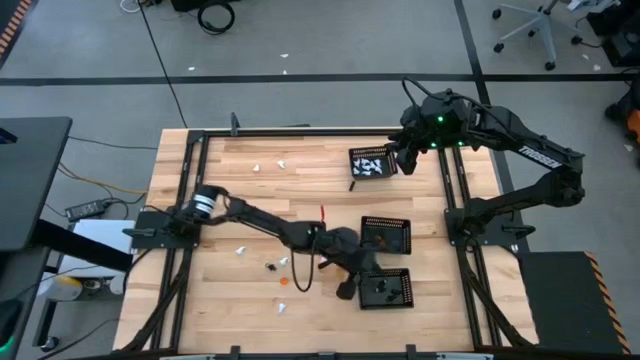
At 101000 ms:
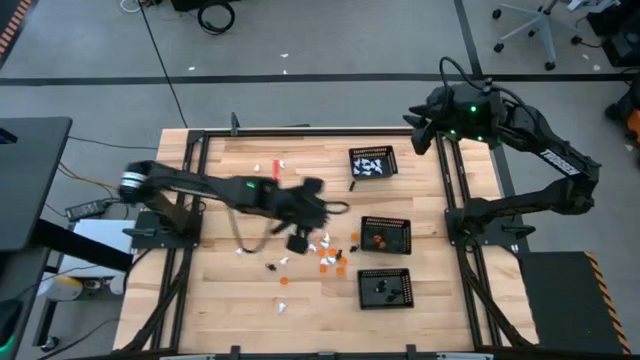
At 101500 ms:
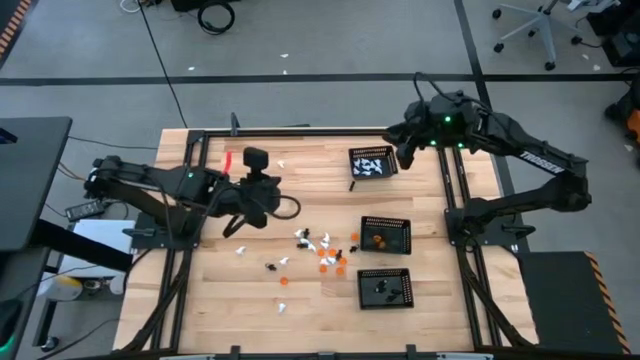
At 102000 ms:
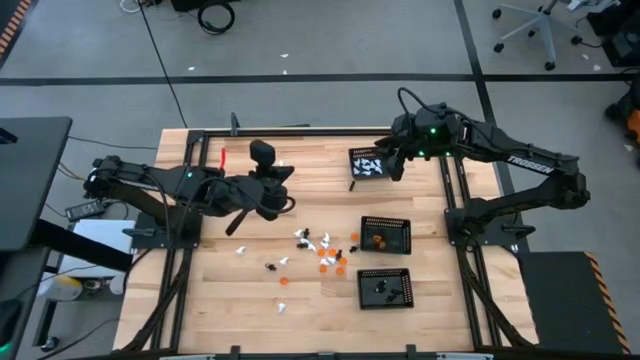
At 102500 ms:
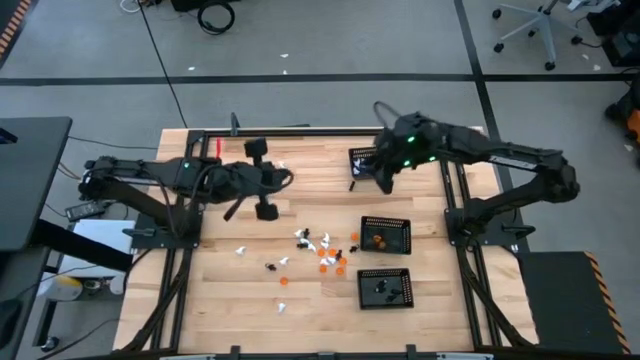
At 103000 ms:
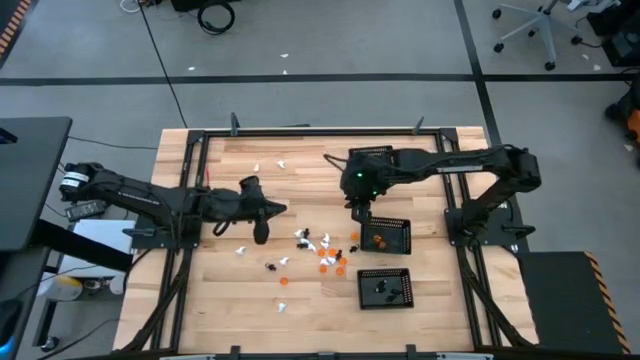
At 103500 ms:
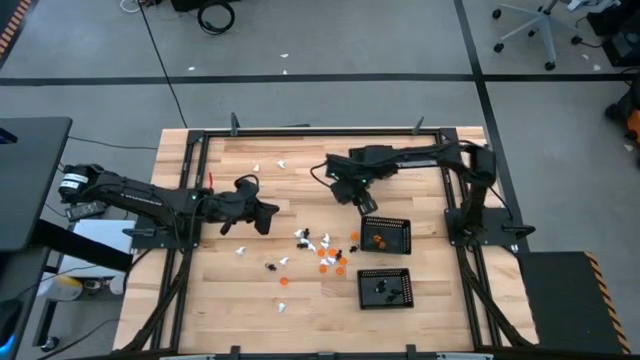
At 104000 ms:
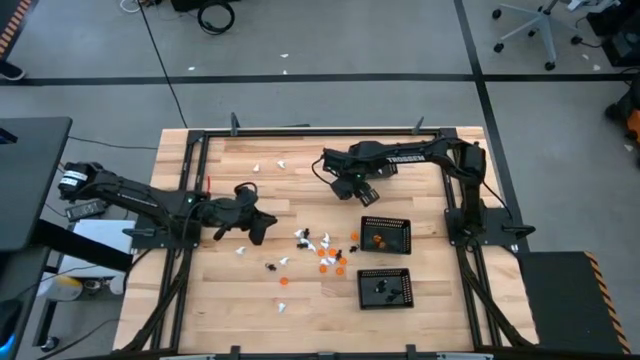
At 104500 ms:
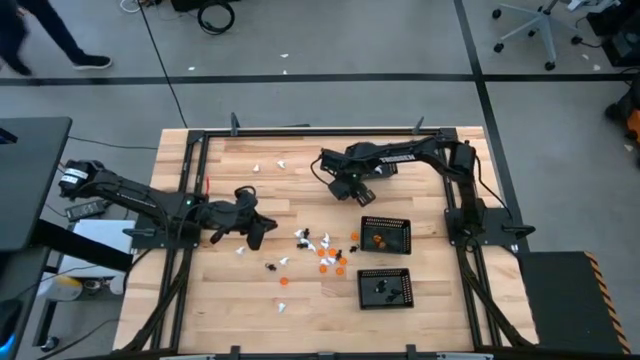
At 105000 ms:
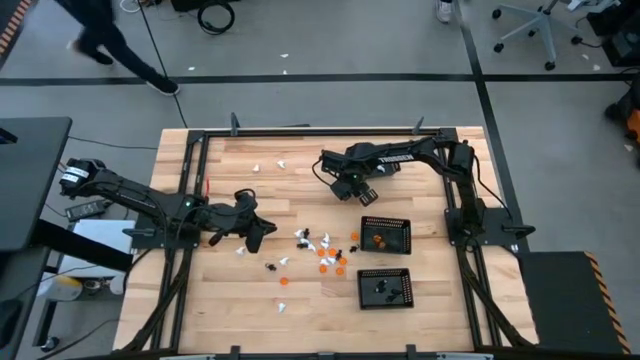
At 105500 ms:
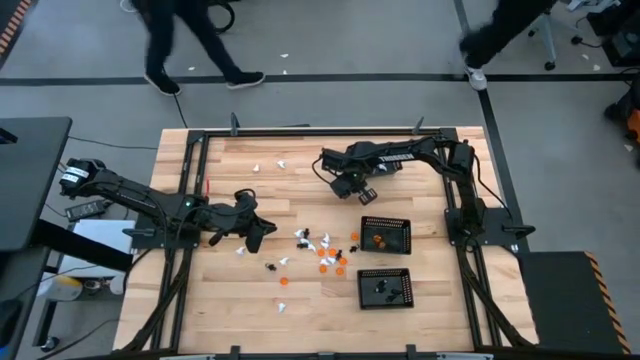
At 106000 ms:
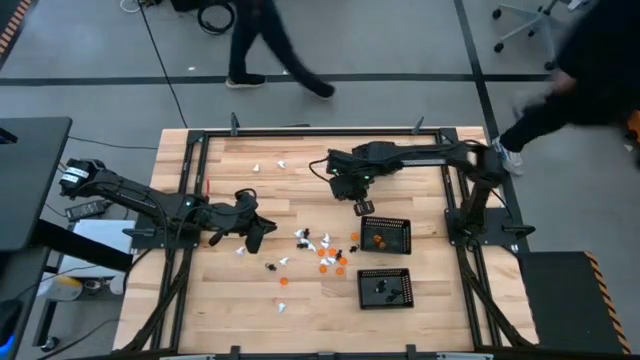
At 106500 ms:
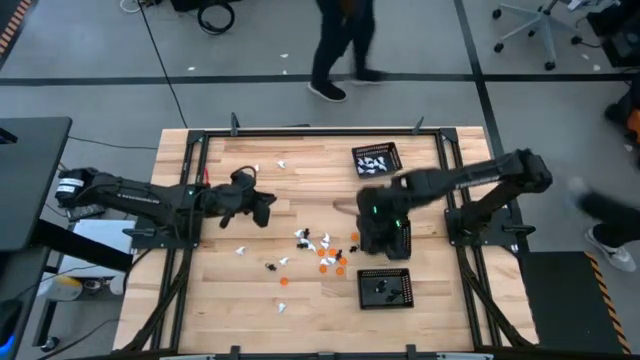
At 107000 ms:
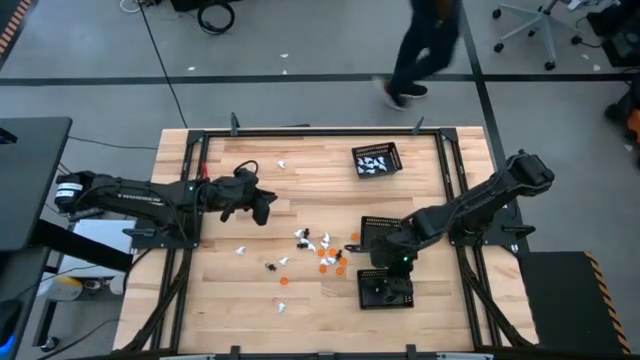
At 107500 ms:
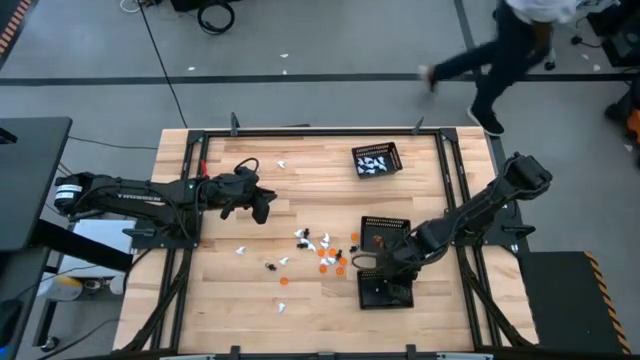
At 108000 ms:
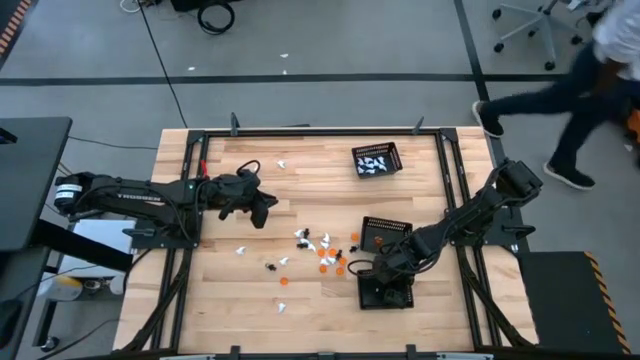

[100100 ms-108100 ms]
Task: Sort Halloween decoration
Put the black skeleton toy into the bottom black bin

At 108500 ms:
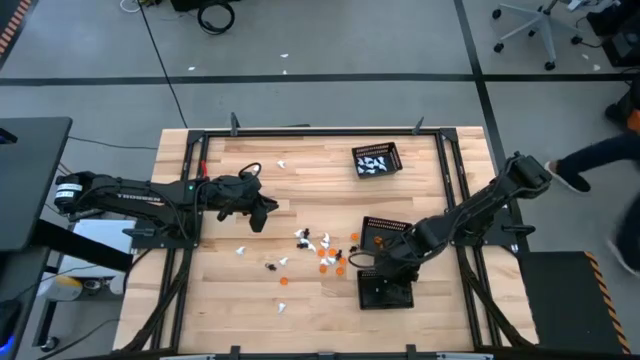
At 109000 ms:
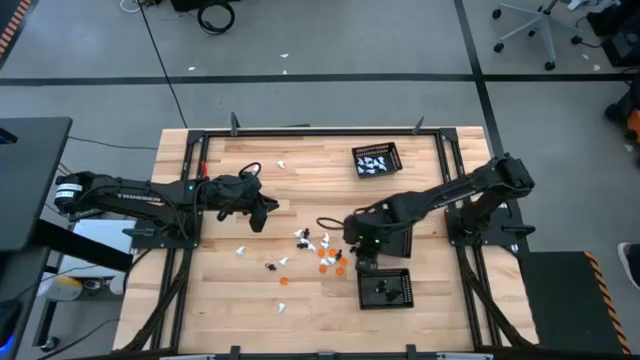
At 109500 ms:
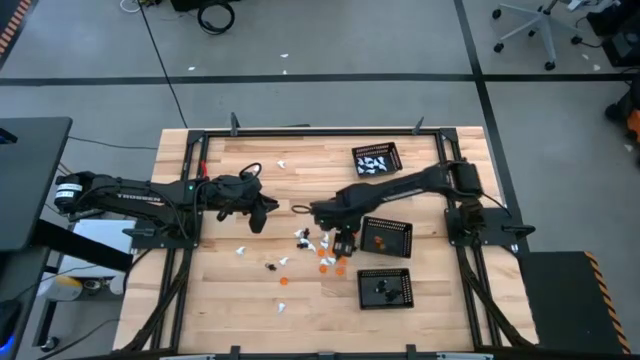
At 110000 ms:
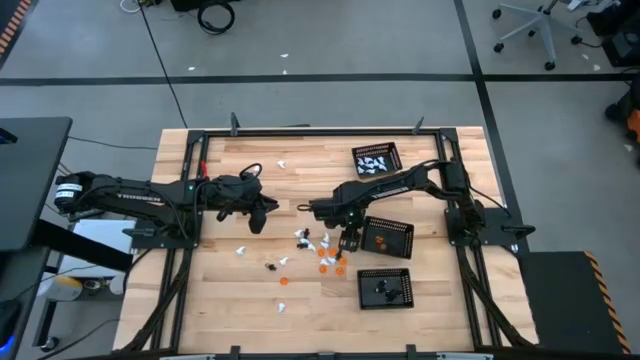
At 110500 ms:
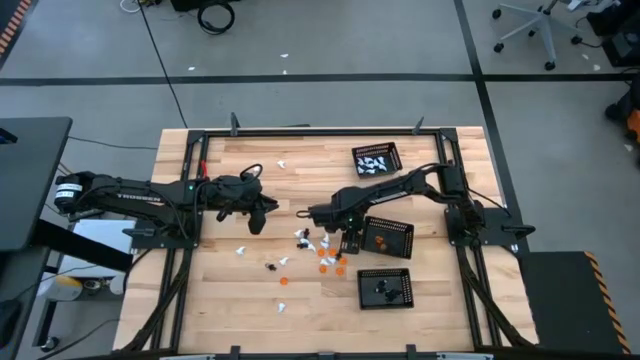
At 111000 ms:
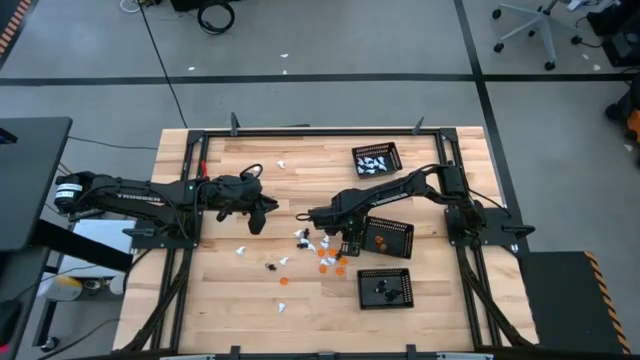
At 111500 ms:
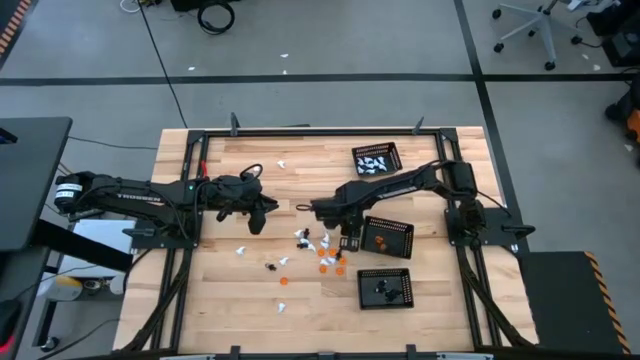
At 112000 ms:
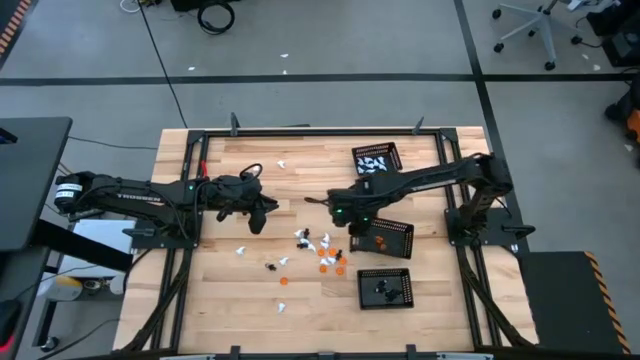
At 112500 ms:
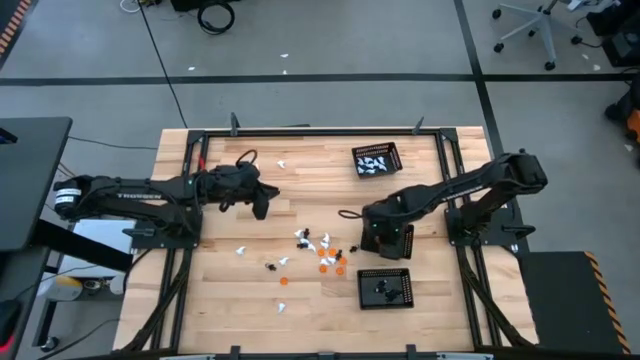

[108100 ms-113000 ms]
Put the orange pumpkin toy into the center black bin

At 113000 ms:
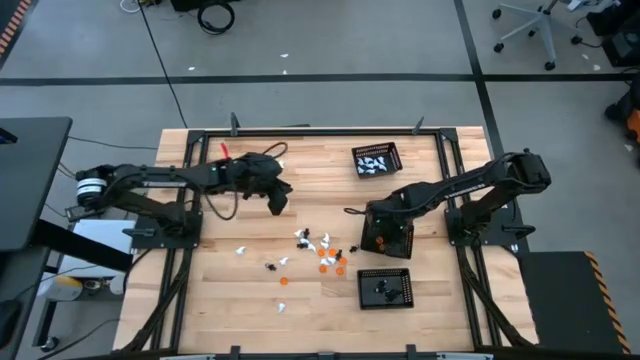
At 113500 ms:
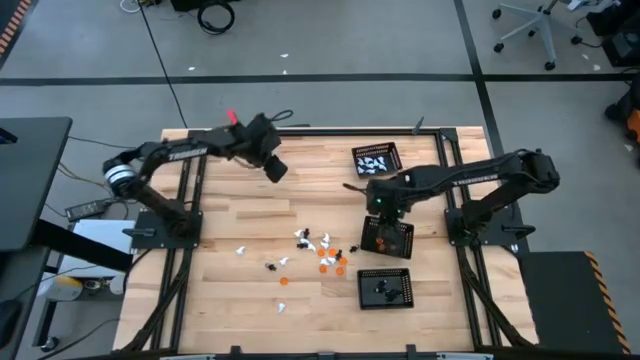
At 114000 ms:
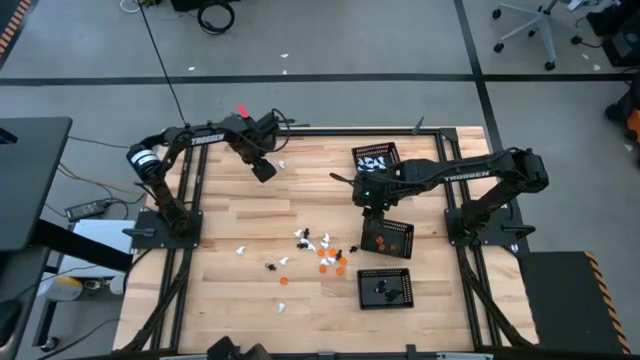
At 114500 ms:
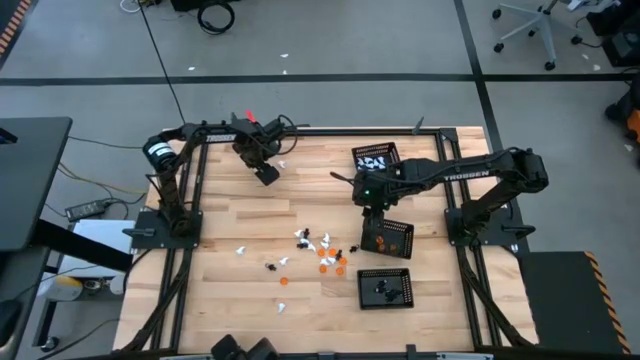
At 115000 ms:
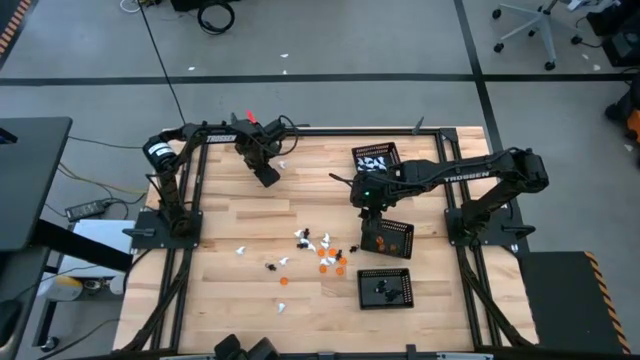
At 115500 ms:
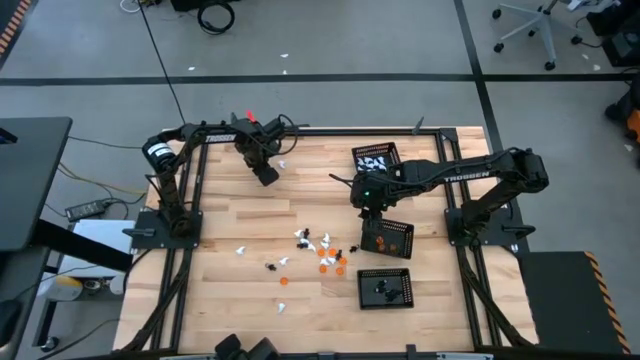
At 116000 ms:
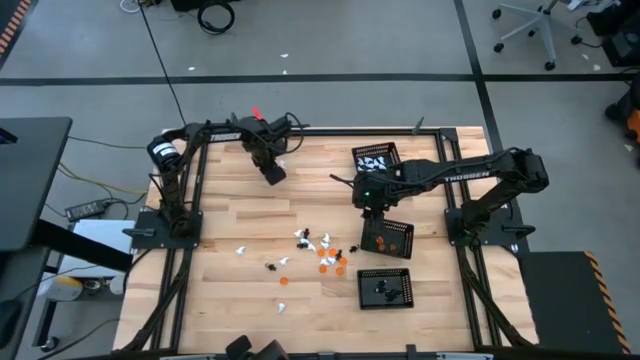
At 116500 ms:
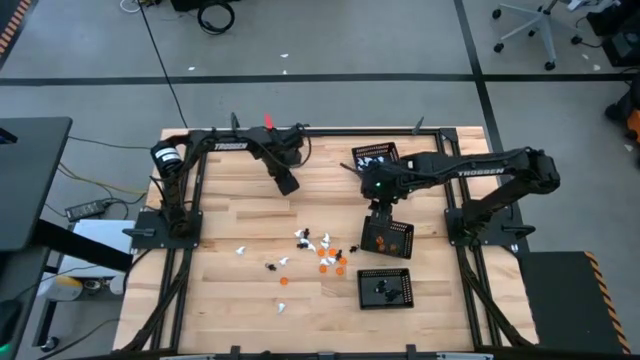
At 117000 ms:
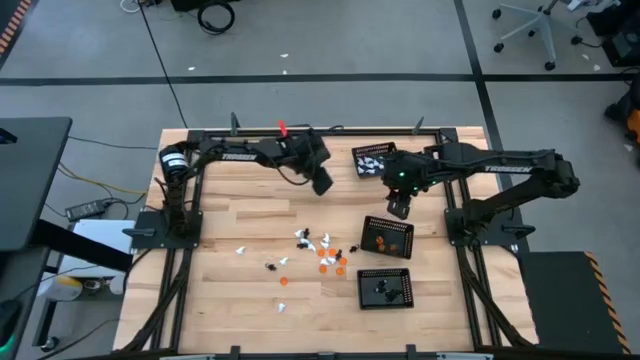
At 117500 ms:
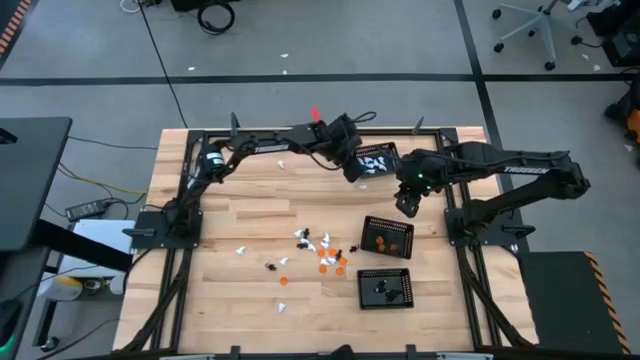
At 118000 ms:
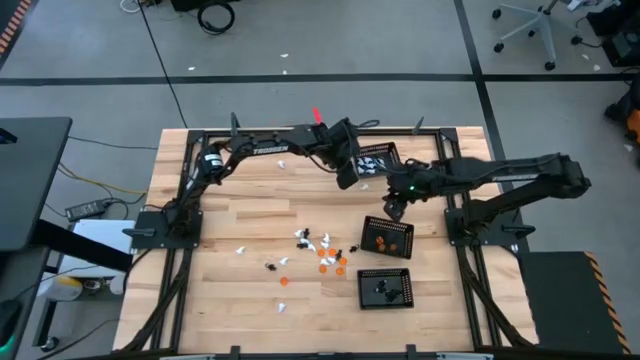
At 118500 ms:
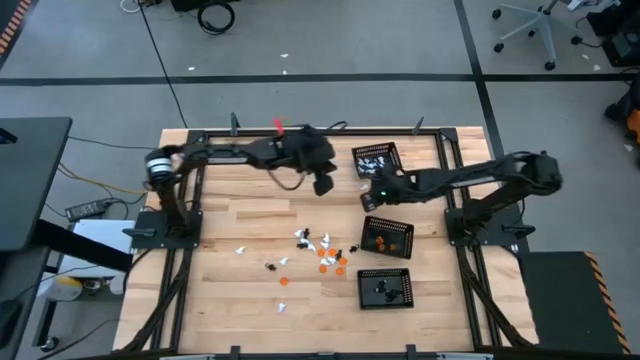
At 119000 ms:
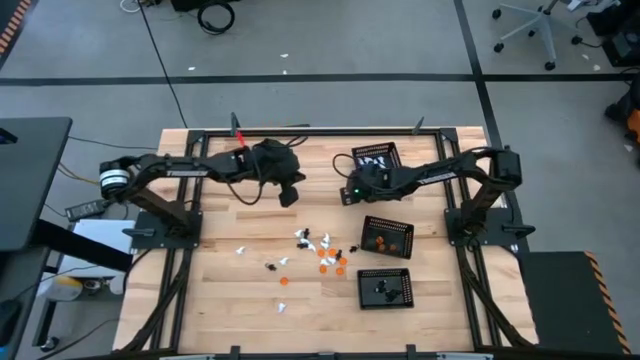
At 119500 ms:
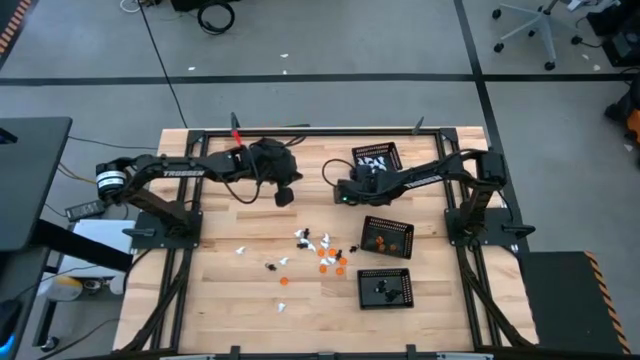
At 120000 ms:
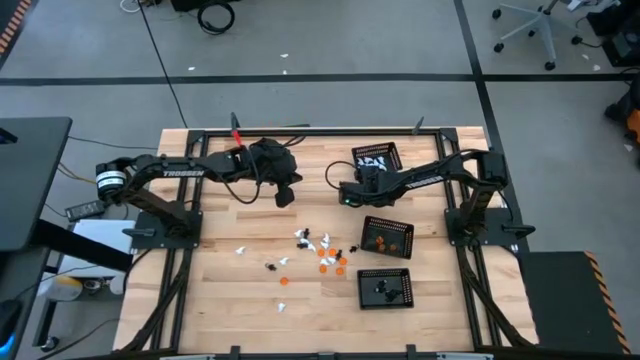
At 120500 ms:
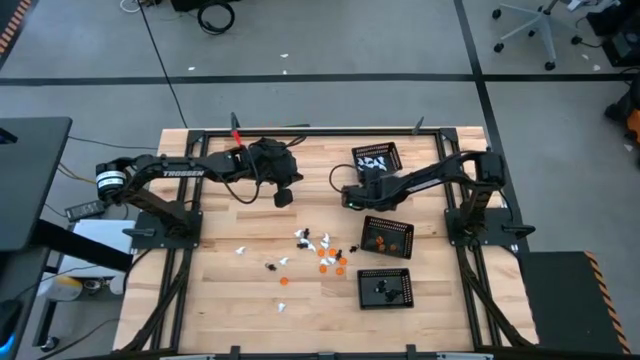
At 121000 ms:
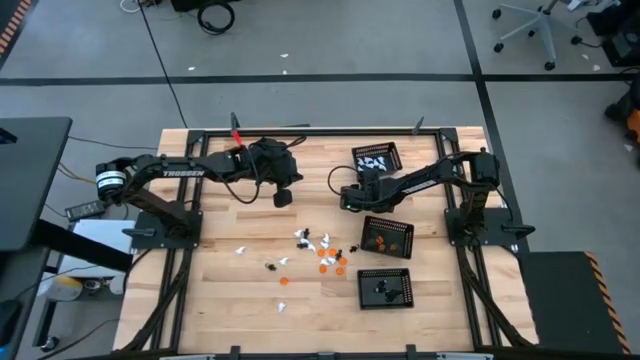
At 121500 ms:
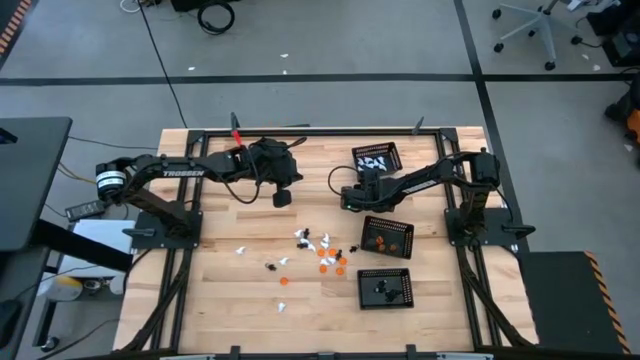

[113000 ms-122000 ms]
Put the white ghost toy into the top black bin
